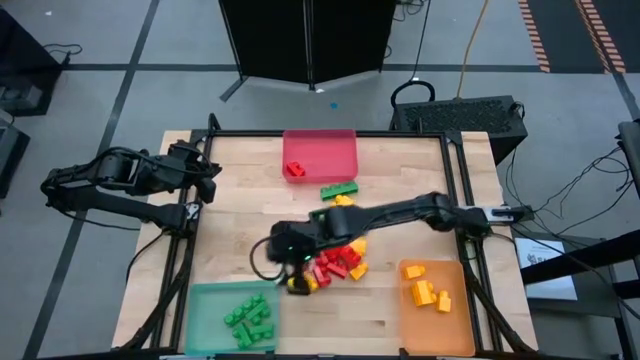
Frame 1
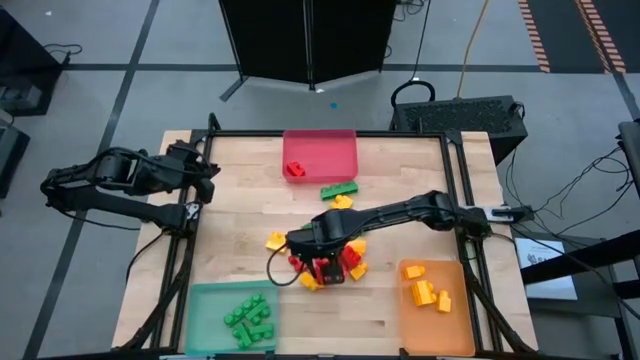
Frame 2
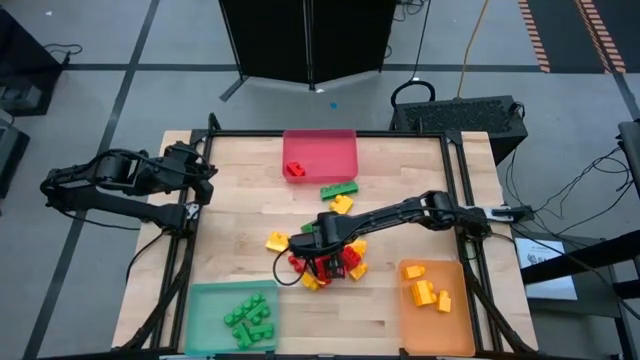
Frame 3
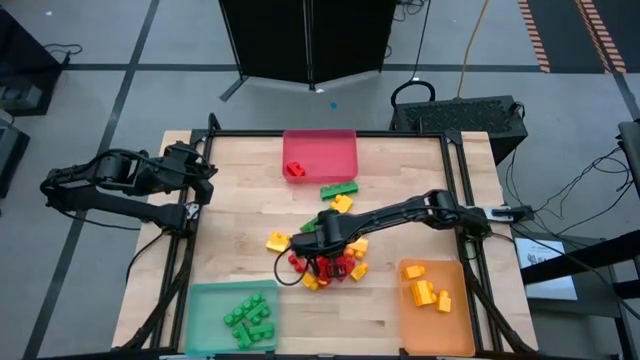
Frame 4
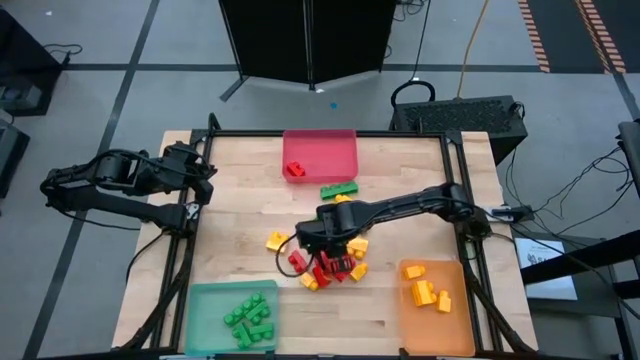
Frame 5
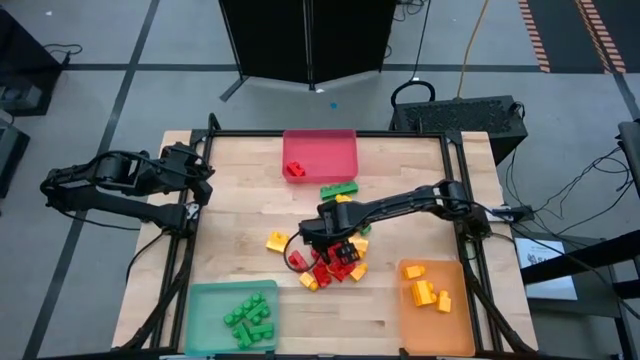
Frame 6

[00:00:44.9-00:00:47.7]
Task: Sort blocks
Put the red game piece into the red bin

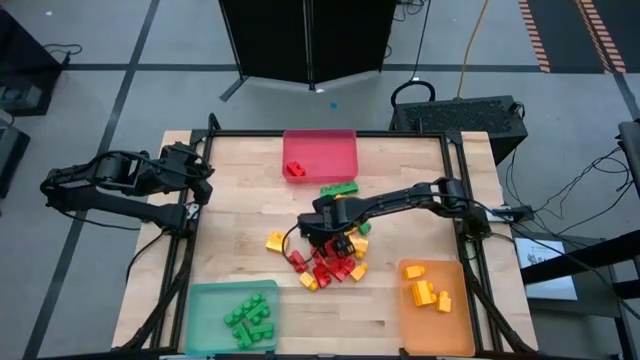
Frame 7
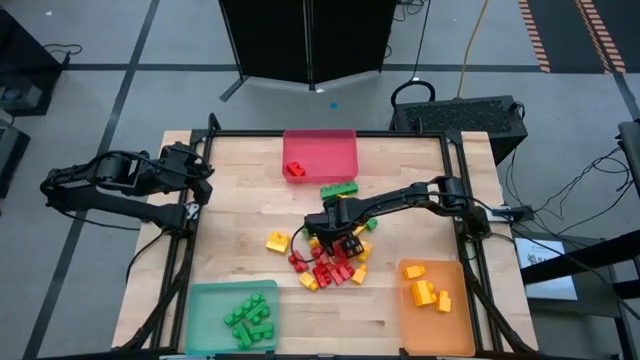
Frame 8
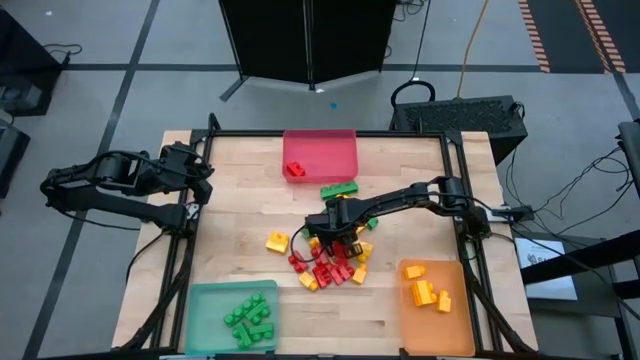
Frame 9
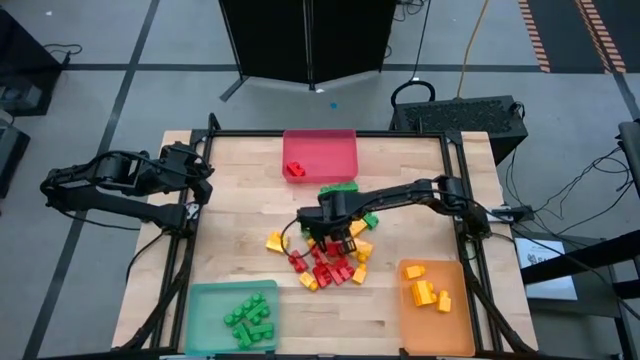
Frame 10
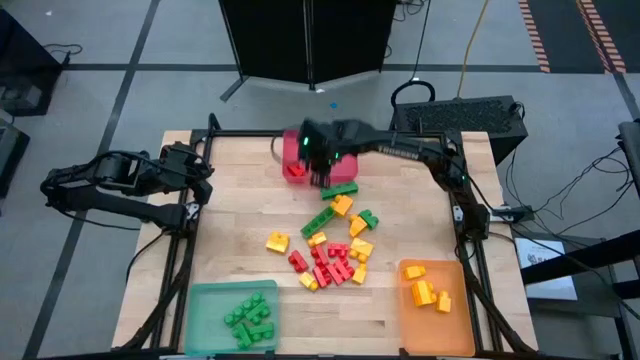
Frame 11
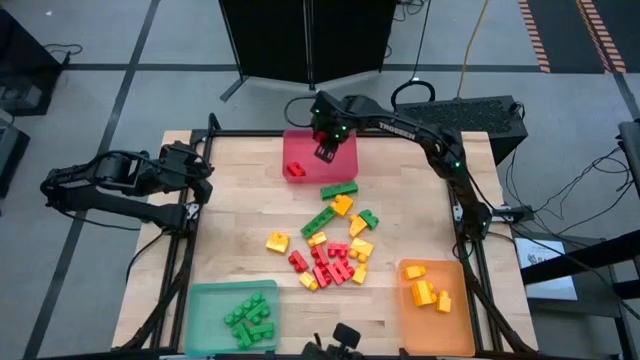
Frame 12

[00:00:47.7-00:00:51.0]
Put the red game piece into the red bin

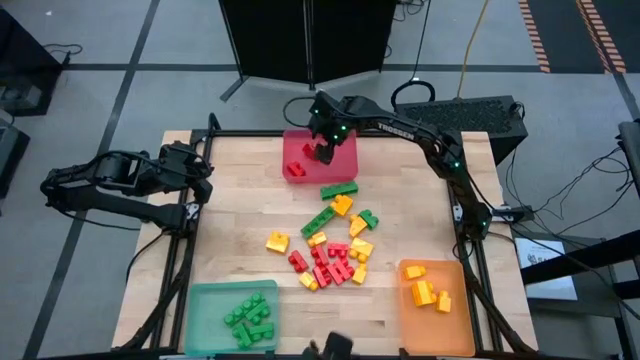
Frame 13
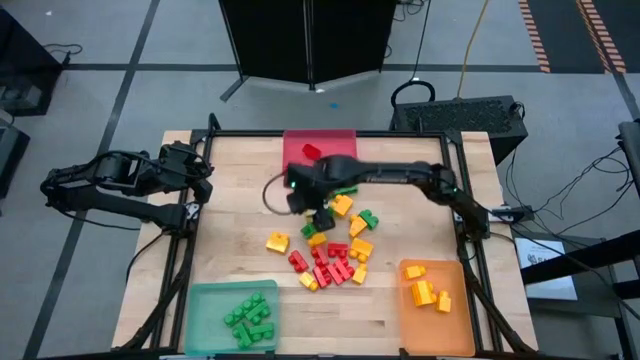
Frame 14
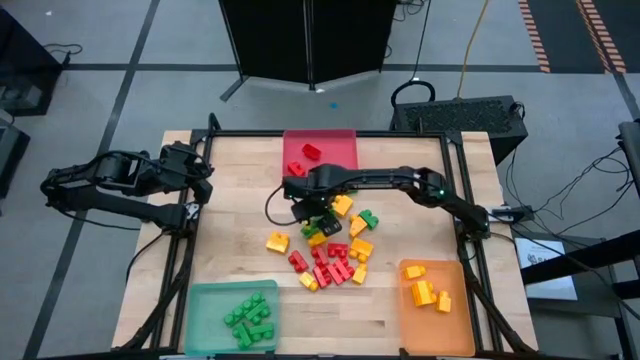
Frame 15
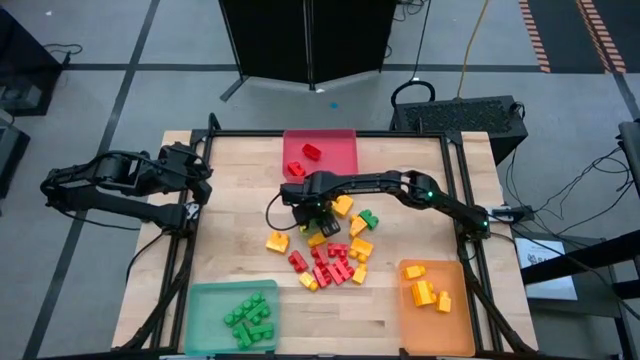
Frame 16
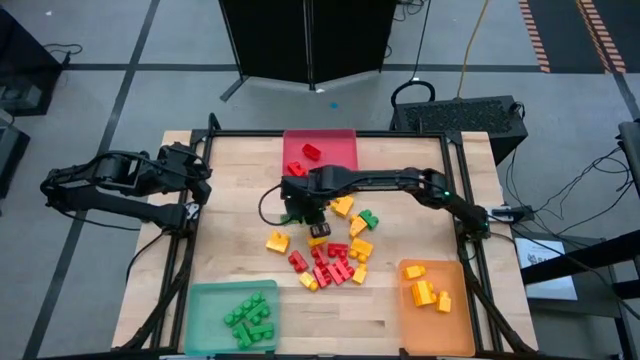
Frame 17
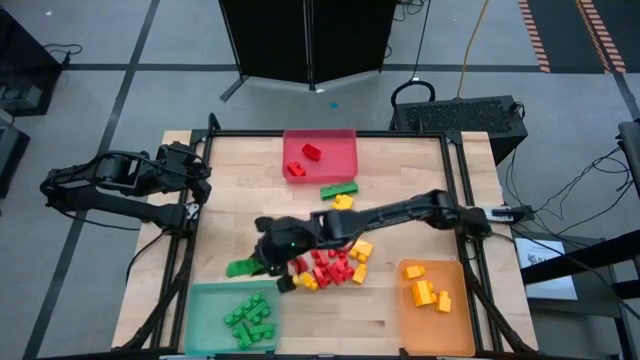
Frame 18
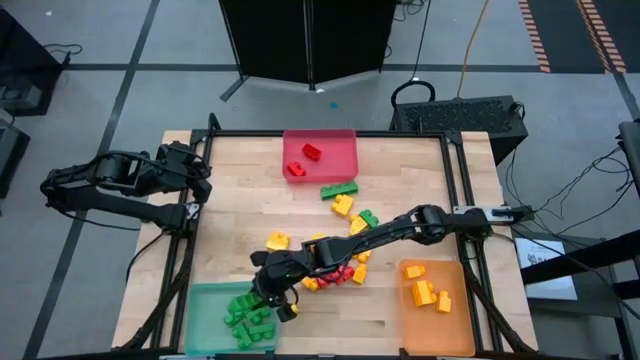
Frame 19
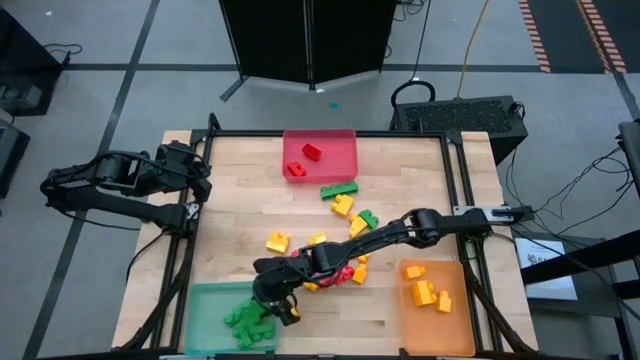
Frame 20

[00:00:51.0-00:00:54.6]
Put the green game piece into the green bin

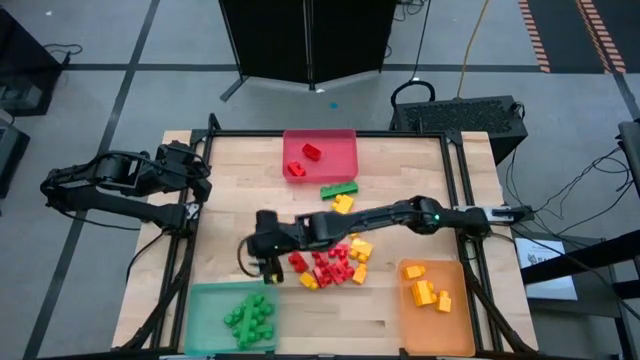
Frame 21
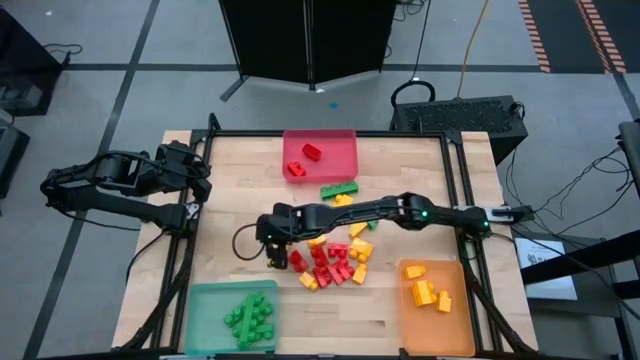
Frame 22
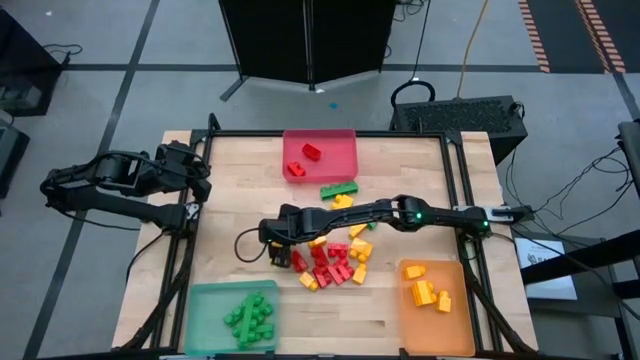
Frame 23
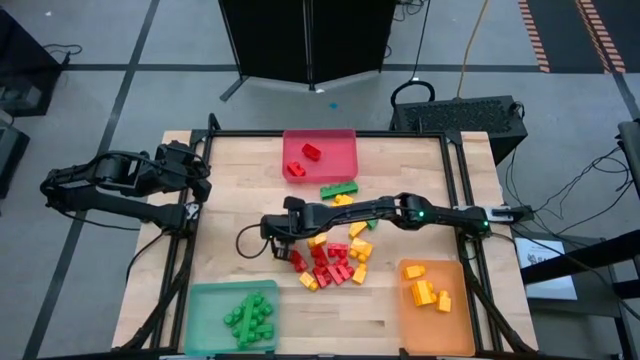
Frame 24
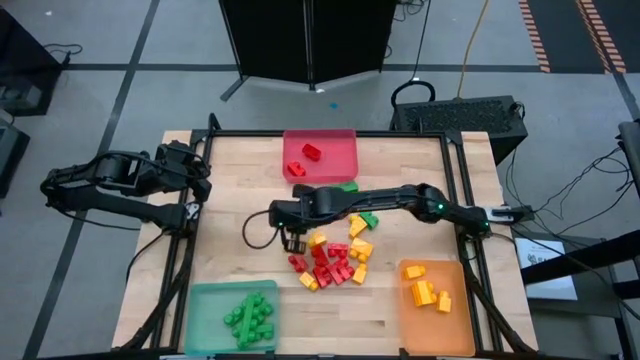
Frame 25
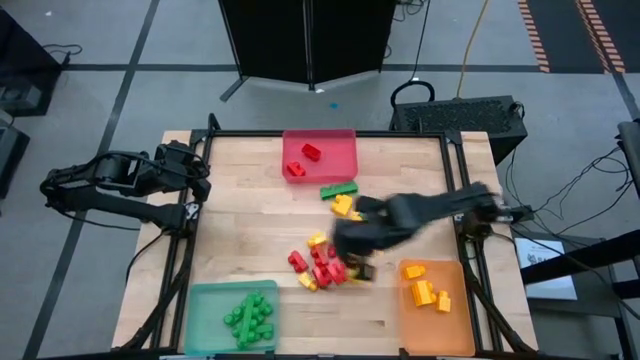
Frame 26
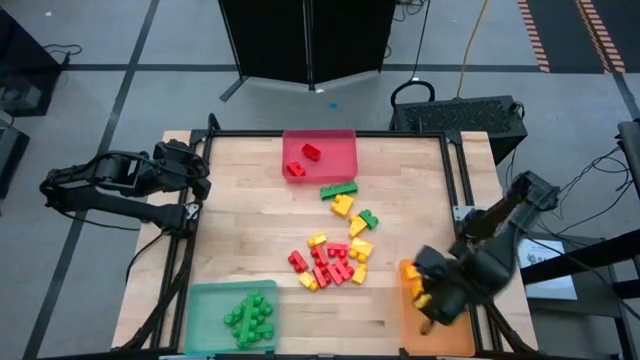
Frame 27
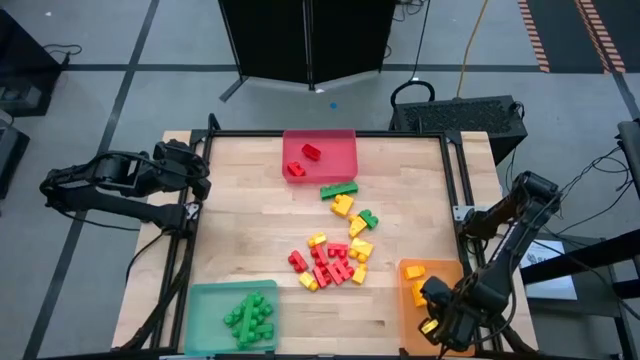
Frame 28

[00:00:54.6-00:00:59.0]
Put the yellow game piece into the orange bin

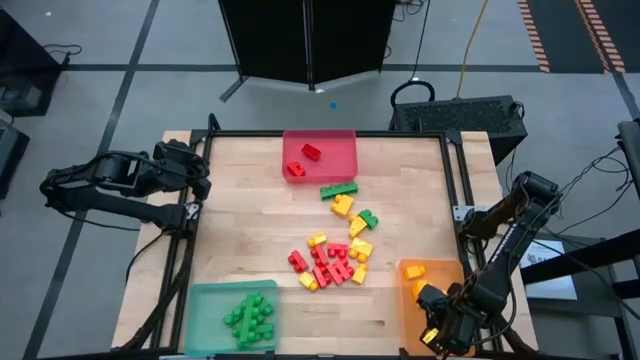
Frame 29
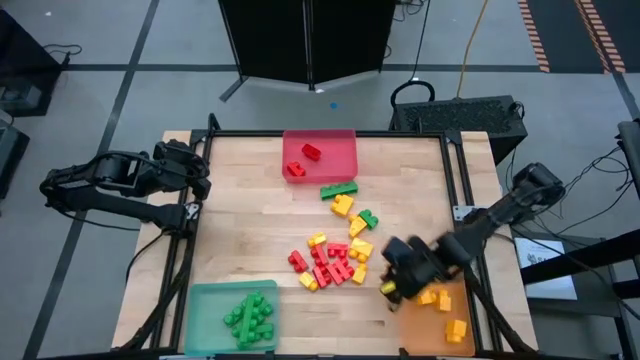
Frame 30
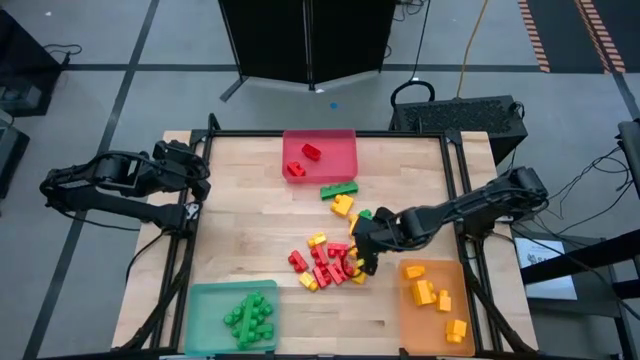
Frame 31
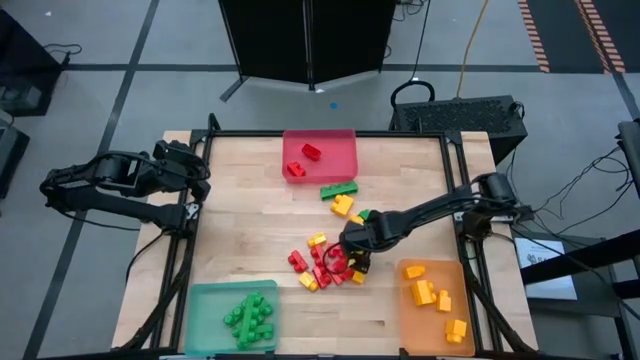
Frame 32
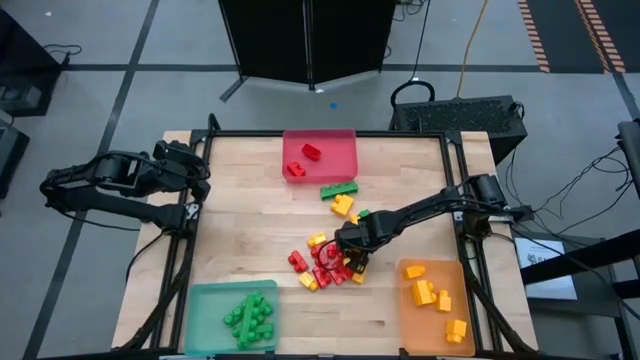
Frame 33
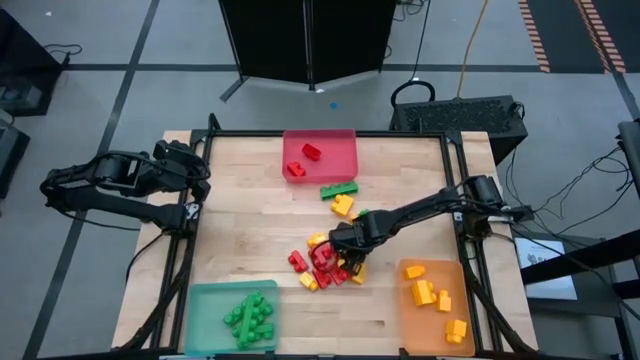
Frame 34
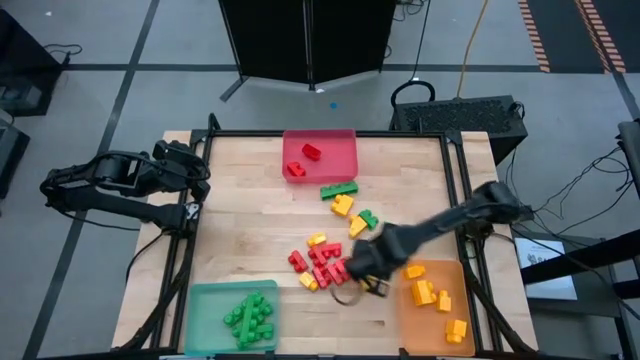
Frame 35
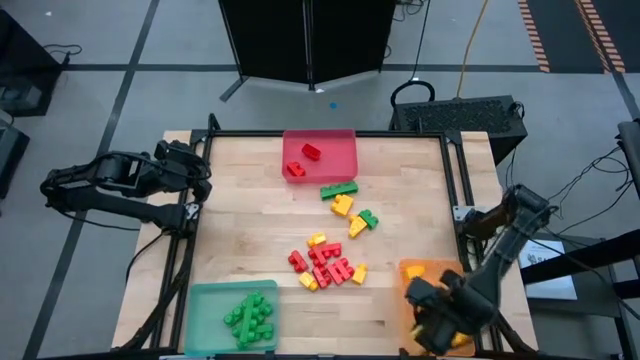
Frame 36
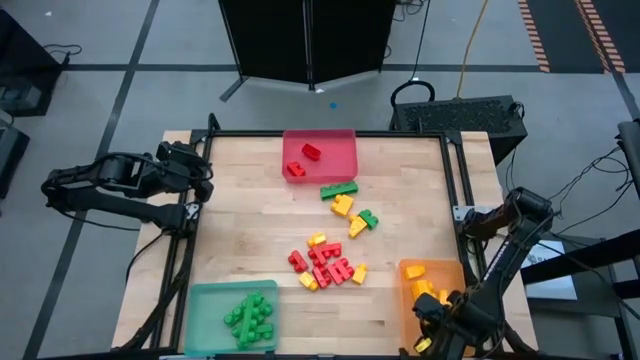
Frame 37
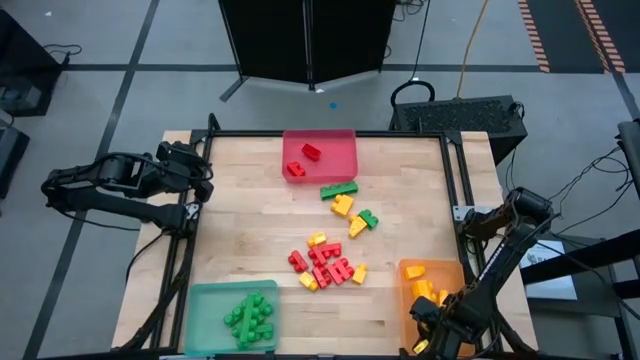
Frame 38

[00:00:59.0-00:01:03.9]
Put the yellow game piece into the orange bin

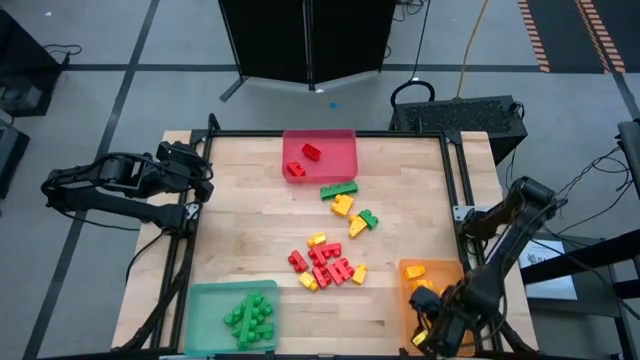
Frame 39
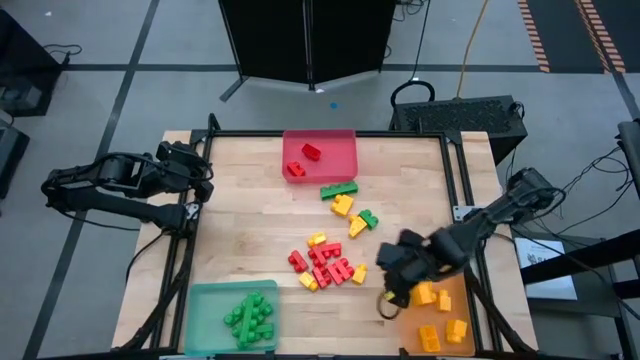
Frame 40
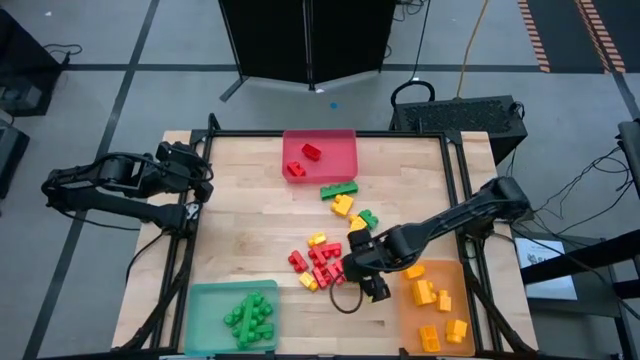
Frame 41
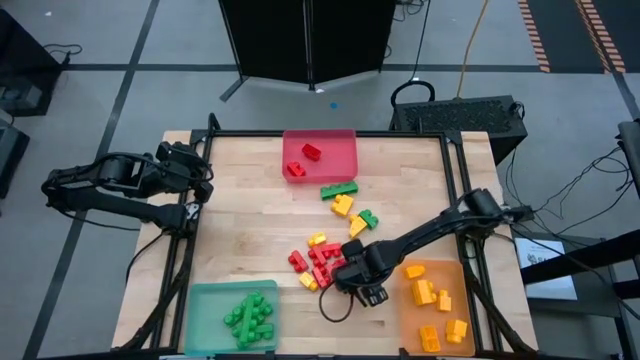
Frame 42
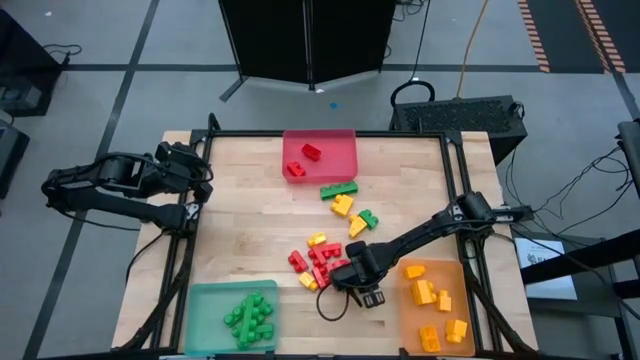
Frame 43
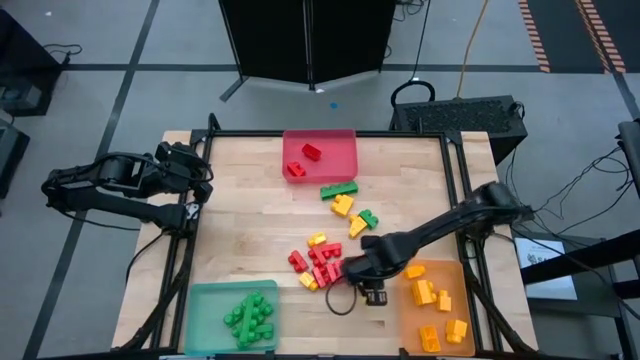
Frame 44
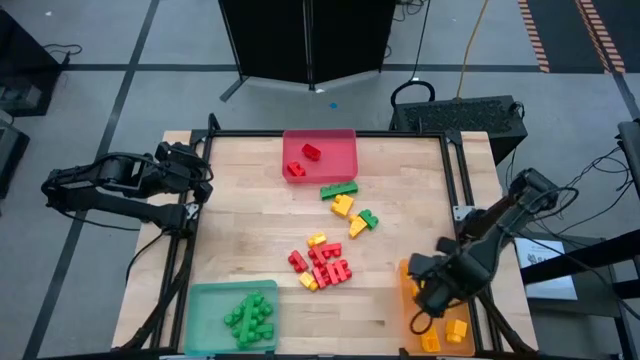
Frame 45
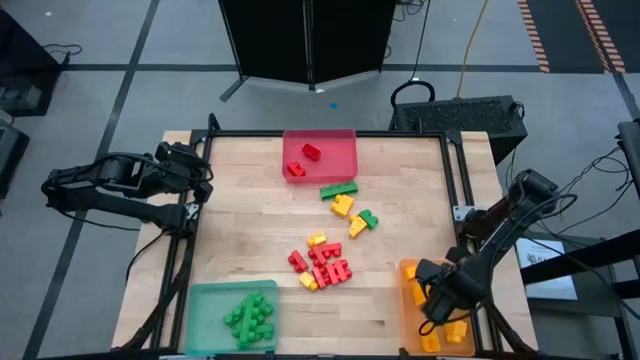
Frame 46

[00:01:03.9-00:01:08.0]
Put the yellow game piece into the orange bin
